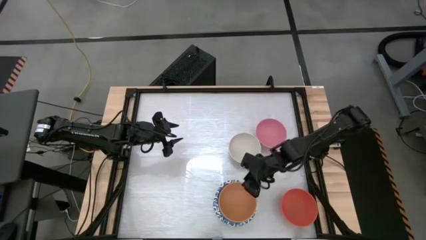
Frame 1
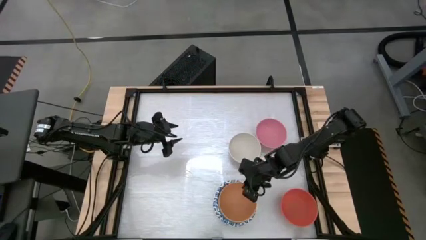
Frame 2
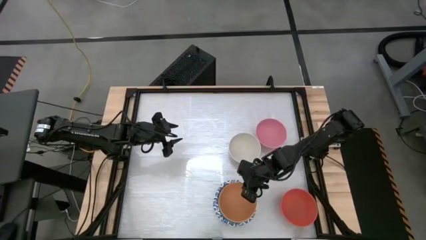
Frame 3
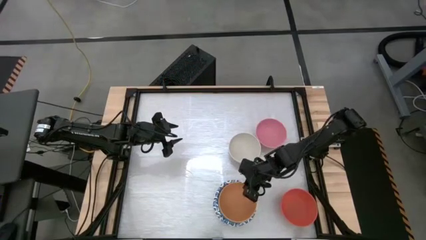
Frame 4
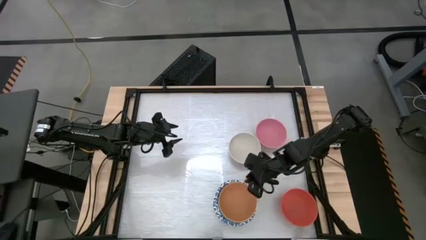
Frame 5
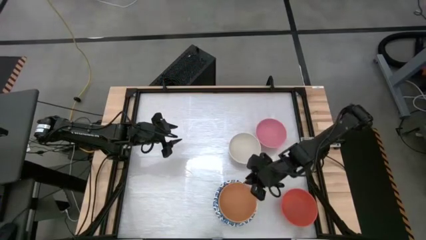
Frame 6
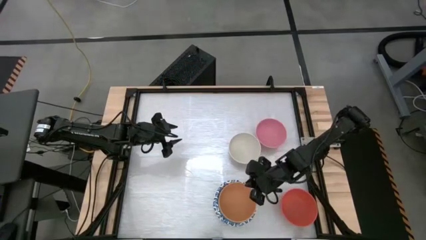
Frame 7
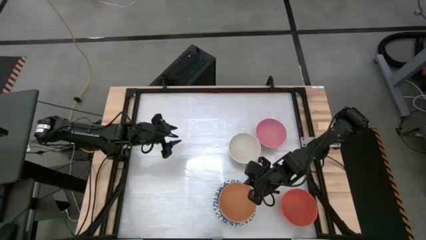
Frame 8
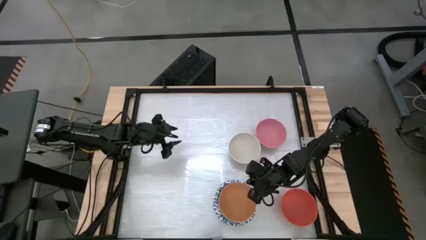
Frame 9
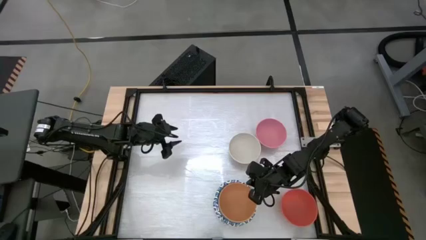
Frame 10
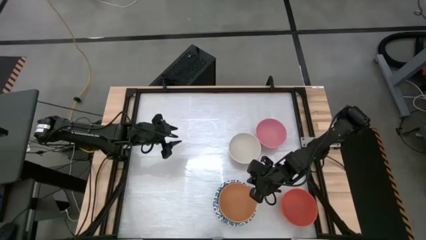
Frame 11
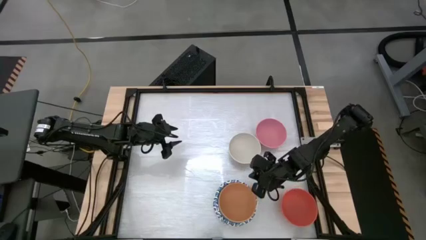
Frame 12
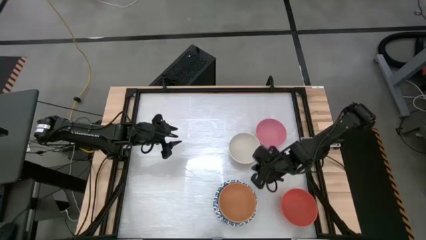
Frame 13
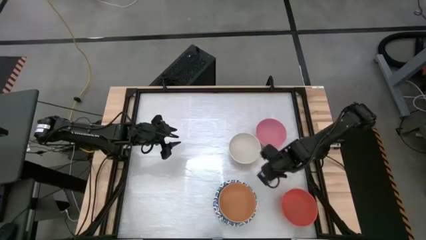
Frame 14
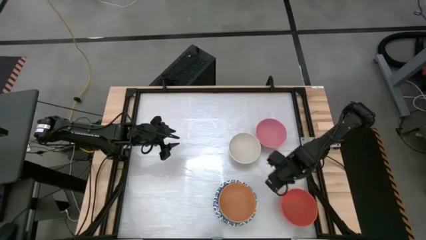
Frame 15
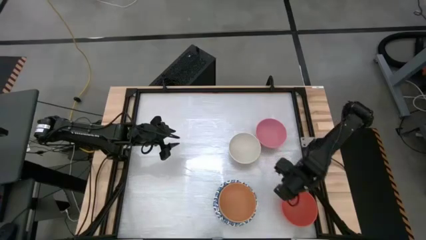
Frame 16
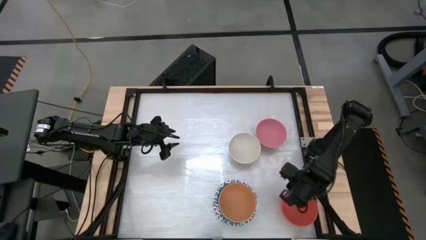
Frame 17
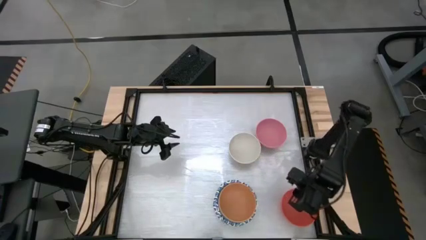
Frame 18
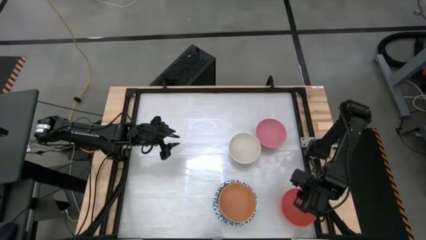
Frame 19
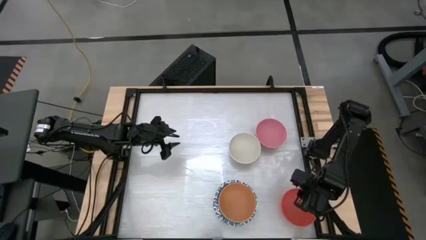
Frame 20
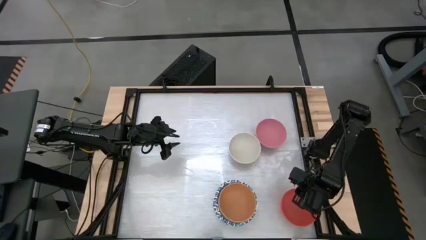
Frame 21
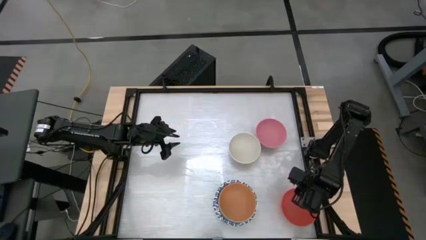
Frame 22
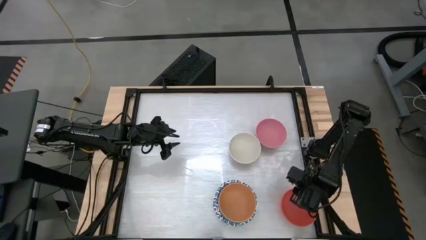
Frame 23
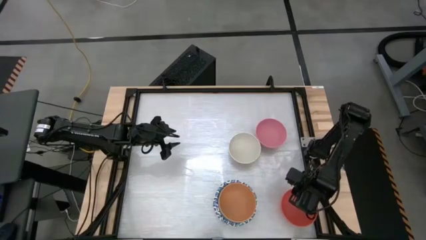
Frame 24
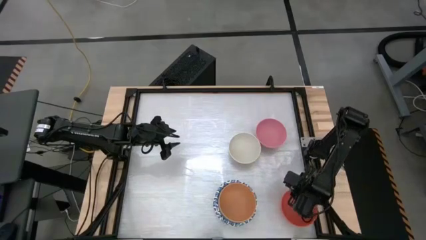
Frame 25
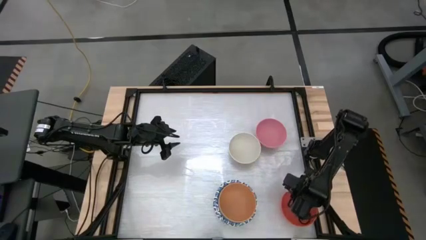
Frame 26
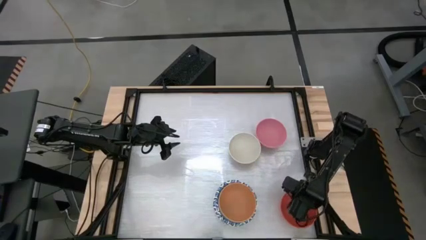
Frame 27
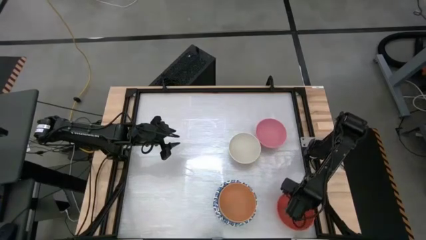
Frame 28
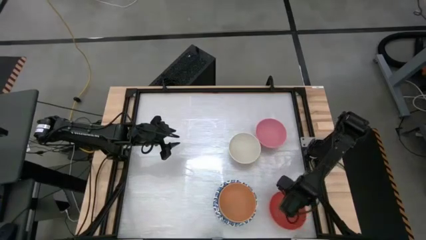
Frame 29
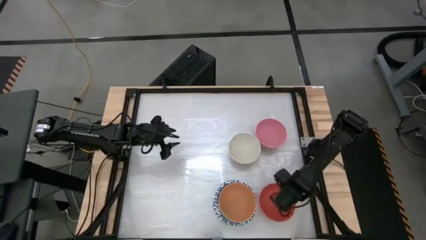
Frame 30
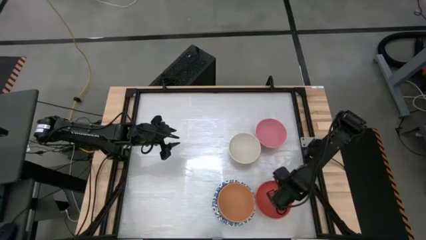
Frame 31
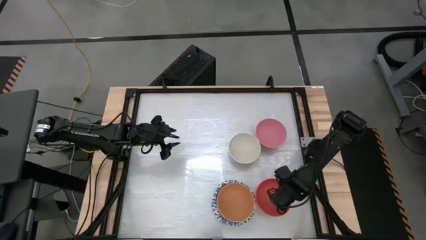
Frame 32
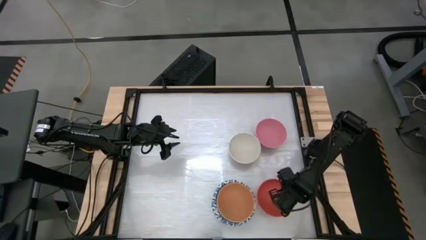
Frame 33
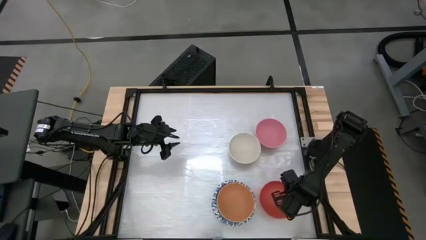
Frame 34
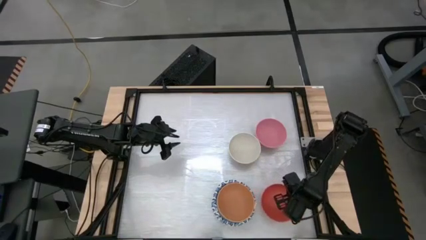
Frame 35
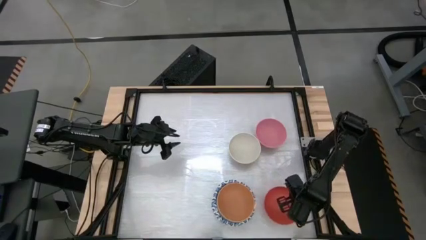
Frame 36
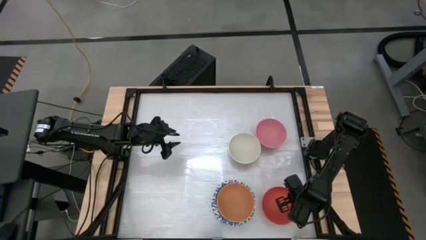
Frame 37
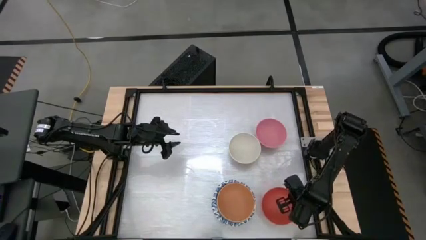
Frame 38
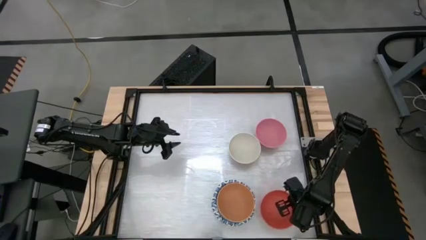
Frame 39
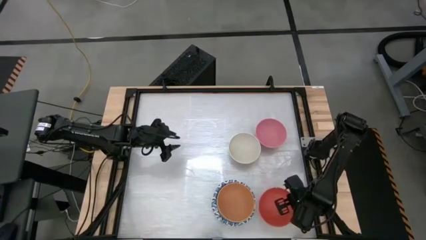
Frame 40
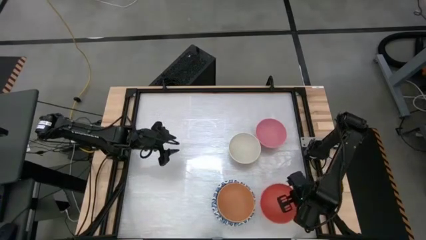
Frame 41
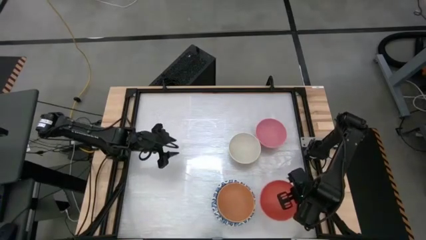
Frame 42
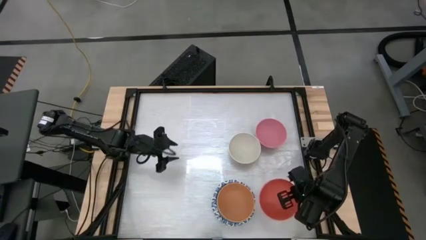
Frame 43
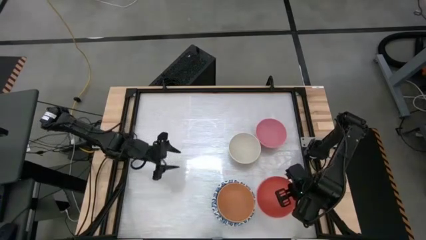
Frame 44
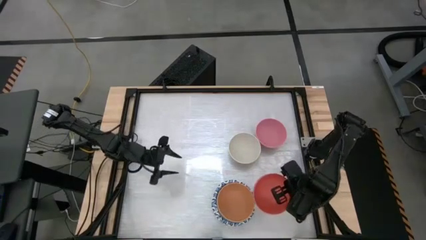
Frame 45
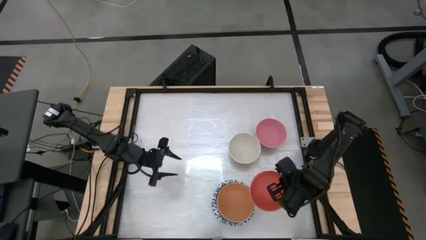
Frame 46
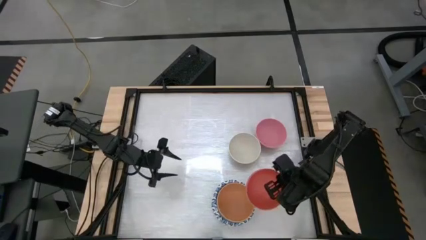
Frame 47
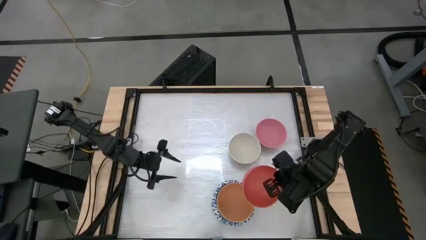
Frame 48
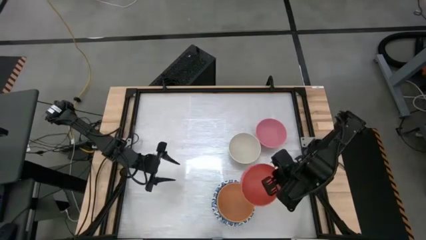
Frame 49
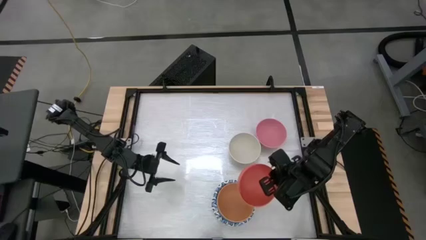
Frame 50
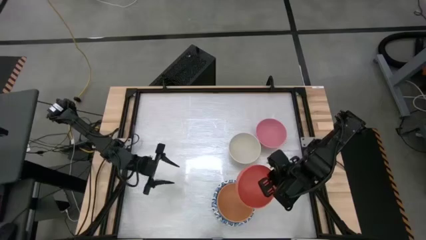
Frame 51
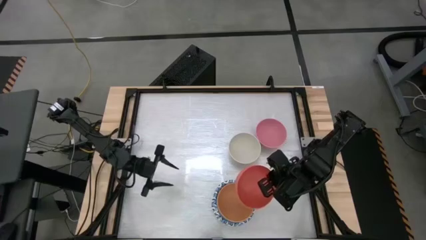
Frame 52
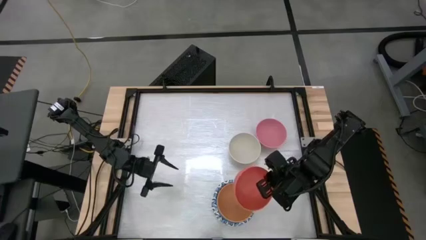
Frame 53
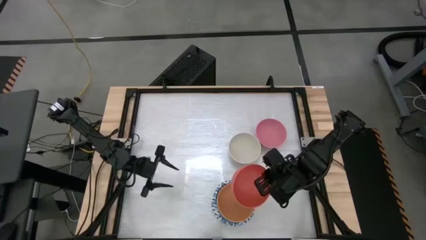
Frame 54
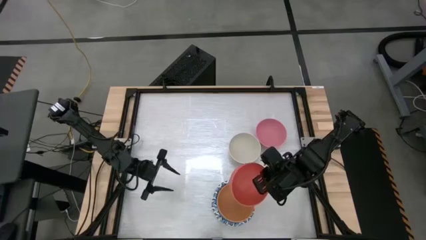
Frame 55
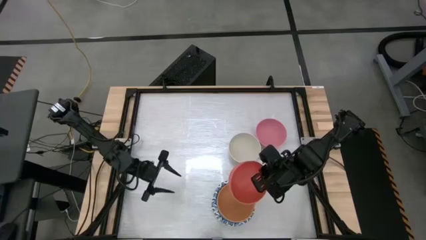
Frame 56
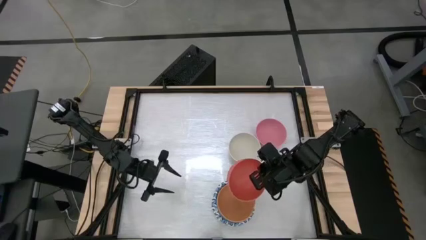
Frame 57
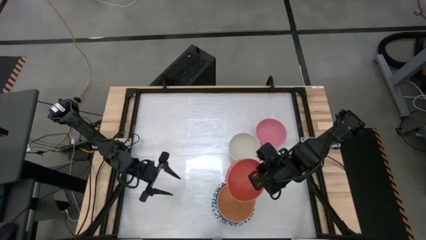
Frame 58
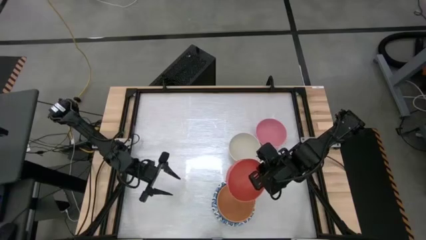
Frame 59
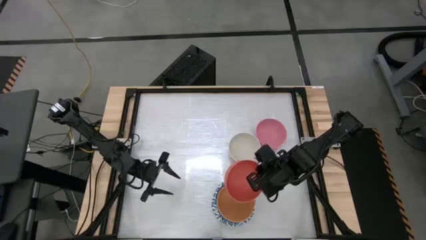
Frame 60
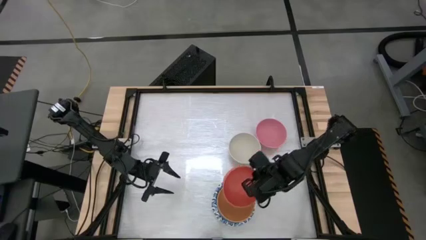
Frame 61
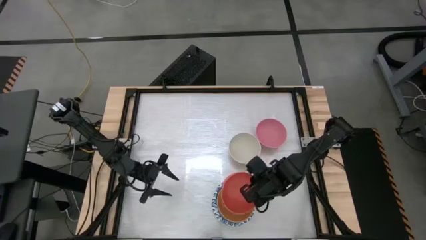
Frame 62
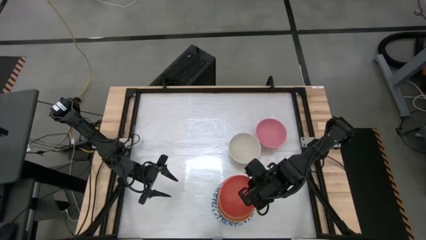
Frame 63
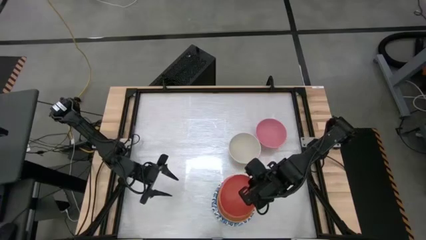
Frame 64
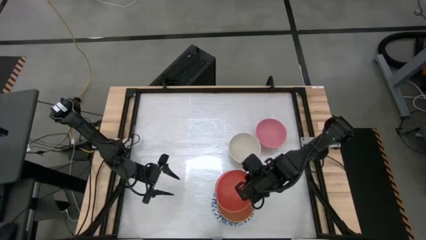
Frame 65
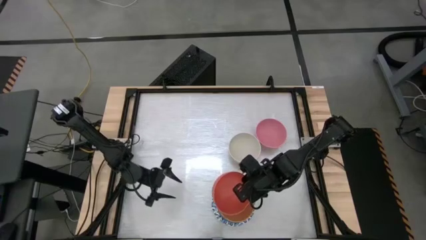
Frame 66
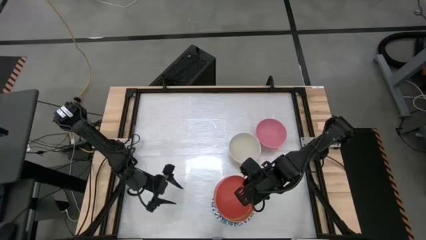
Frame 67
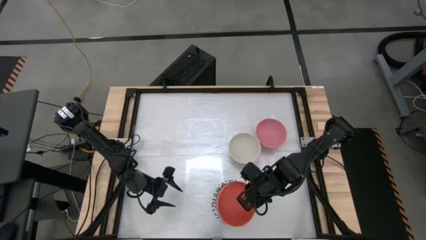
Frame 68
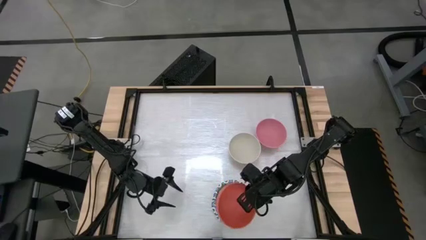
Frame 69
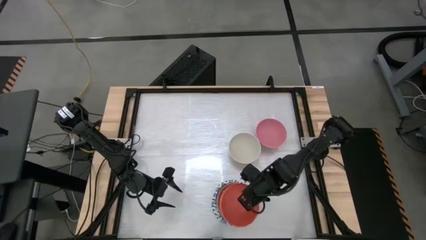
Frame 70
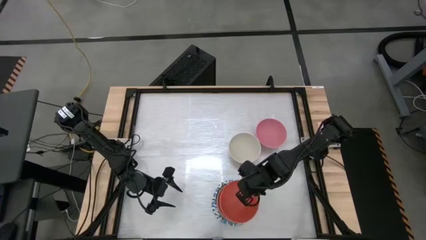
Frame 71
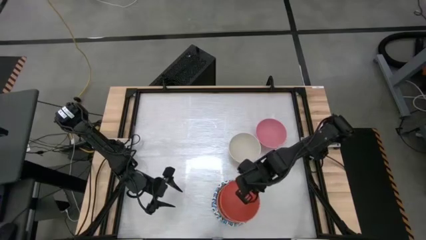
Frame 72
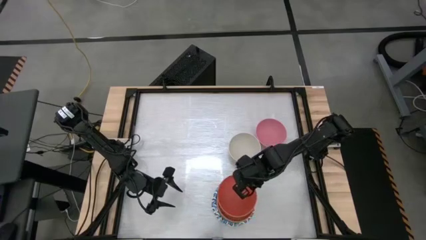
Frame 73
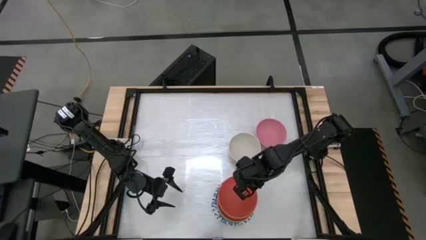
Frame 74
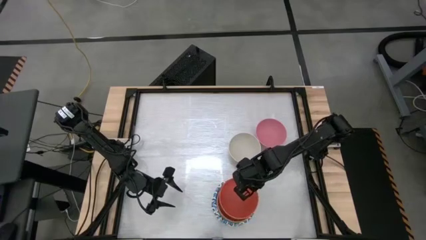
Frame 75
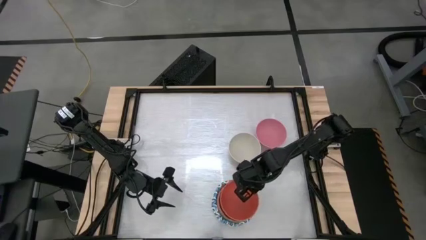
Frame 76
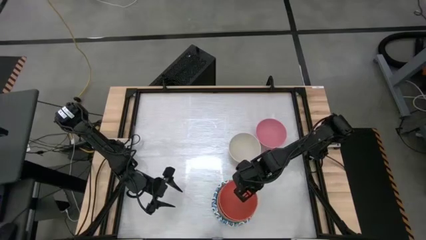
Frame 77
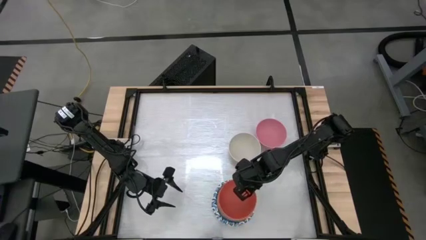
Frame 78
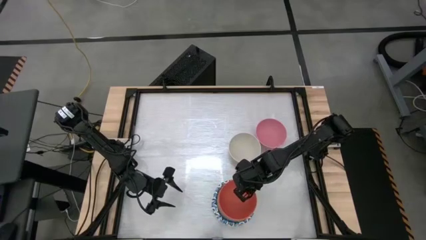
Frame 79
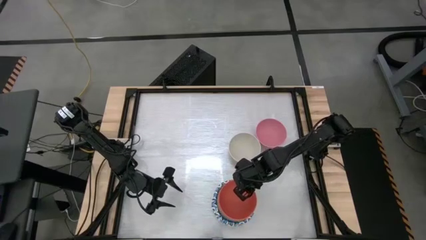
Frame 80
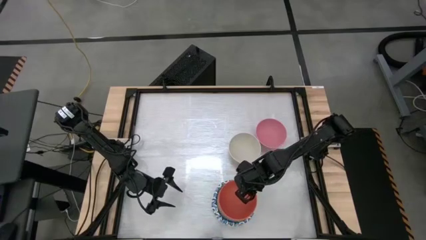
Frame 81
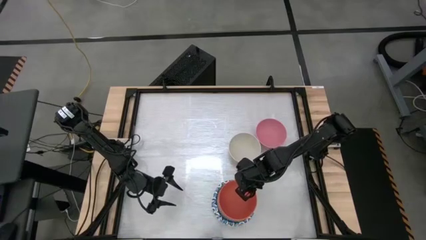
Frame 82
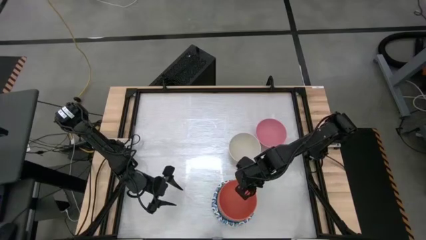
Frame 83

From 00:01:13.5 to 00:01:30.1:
Stack the orange bowl into the brown bowl
